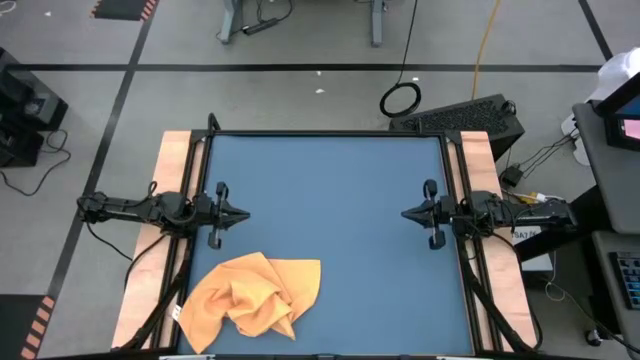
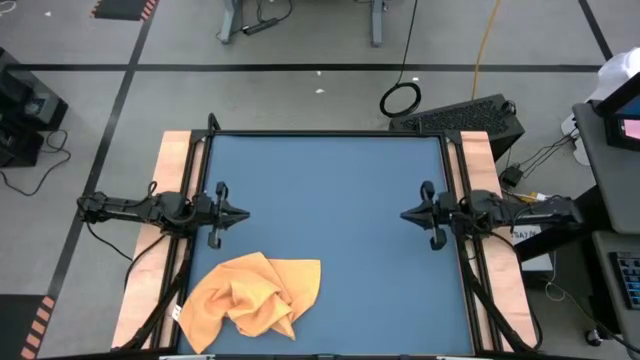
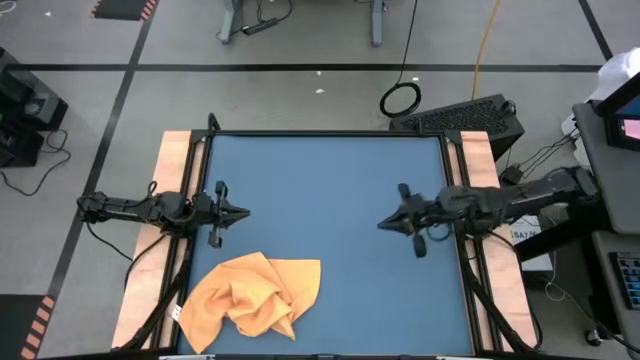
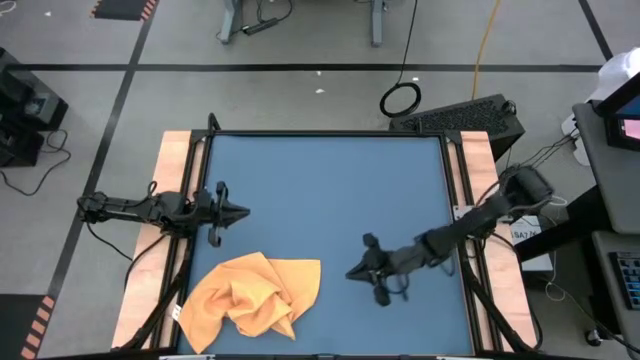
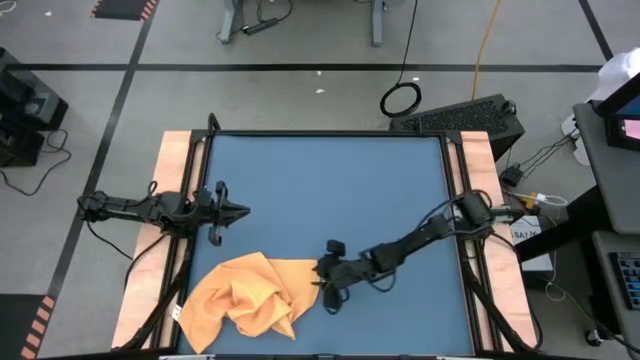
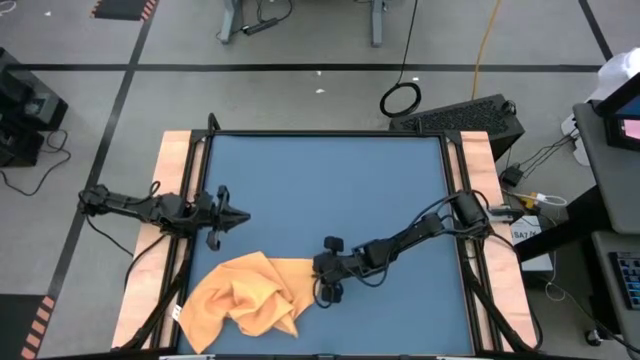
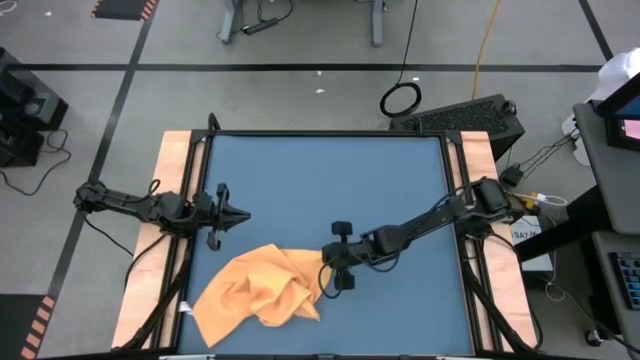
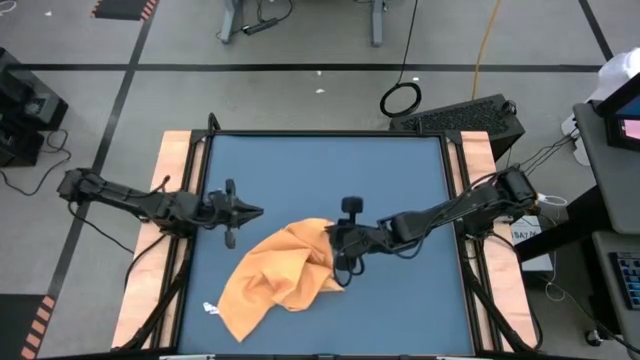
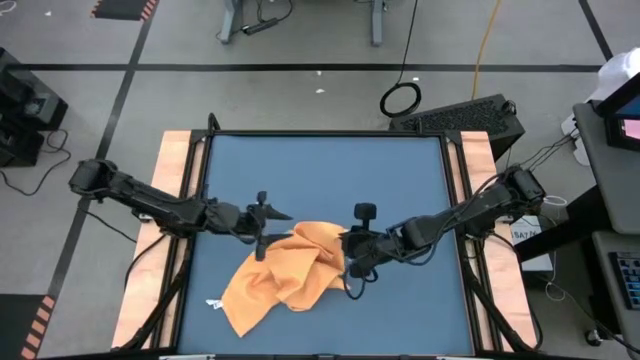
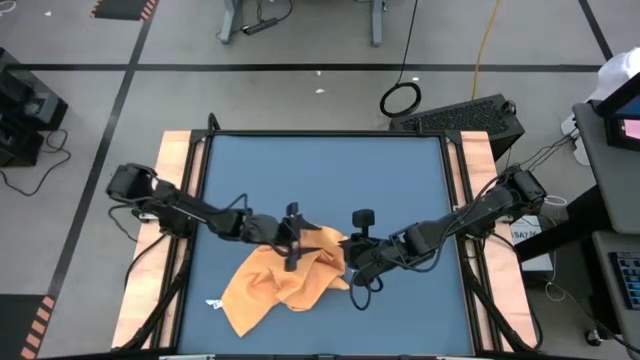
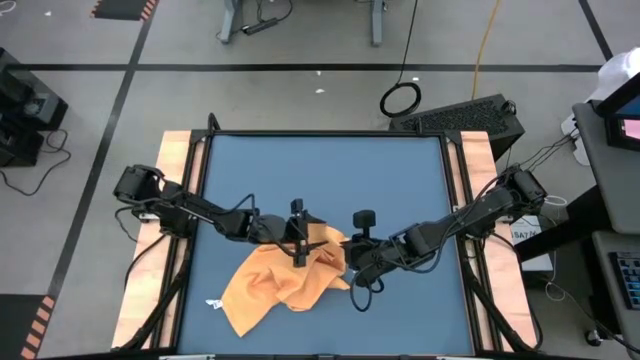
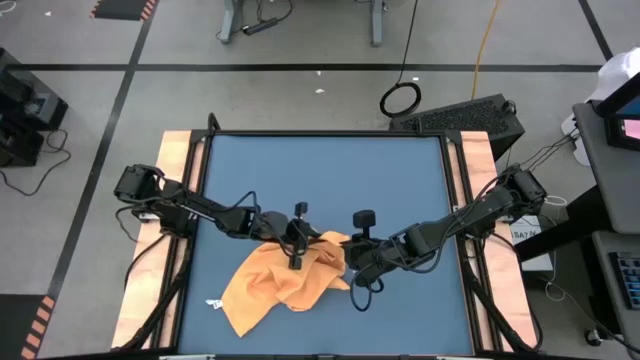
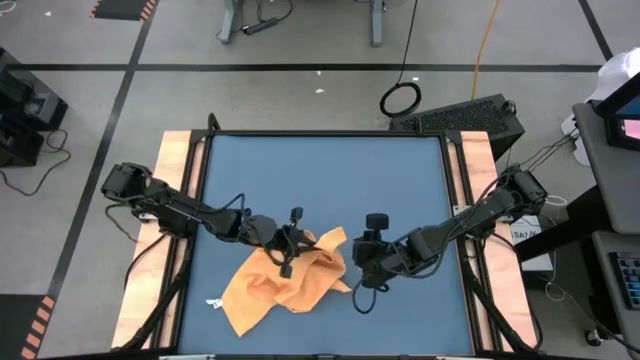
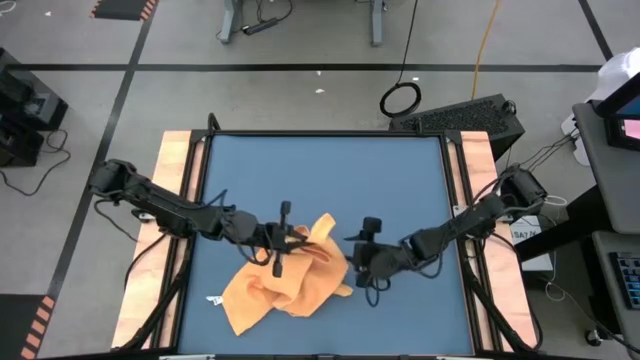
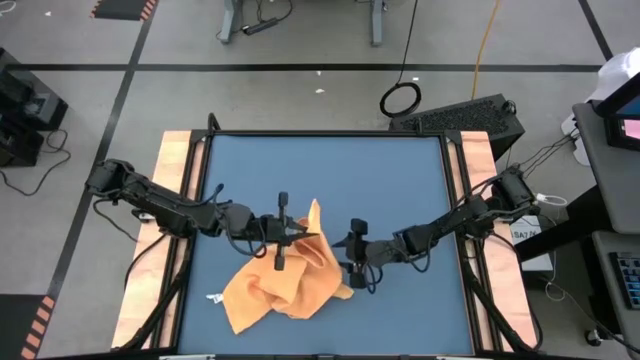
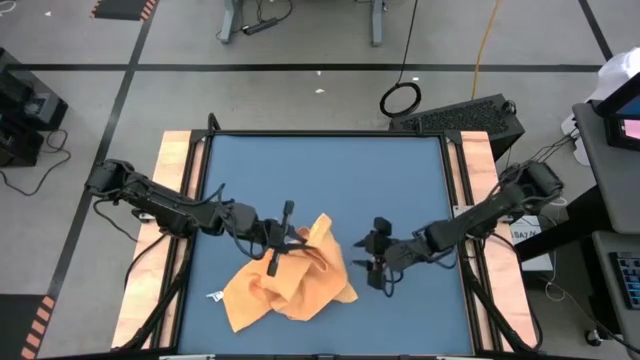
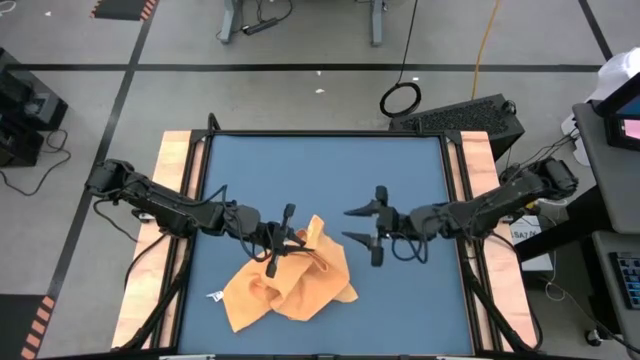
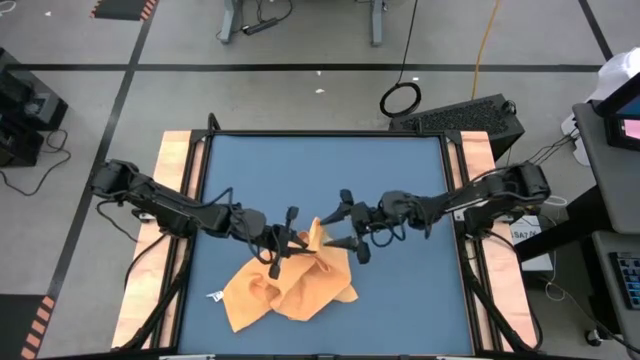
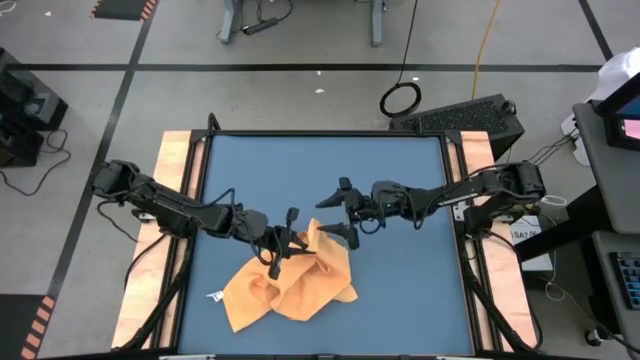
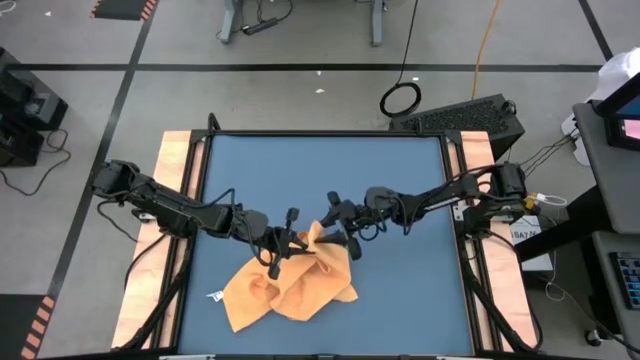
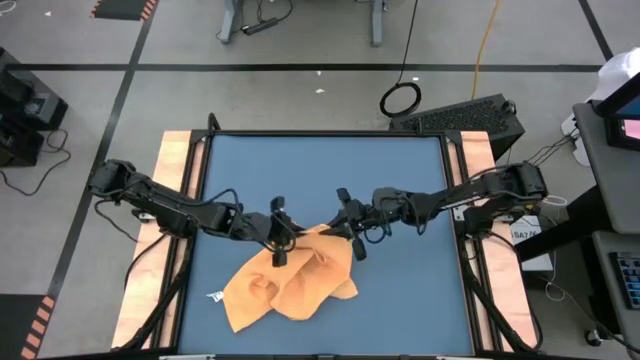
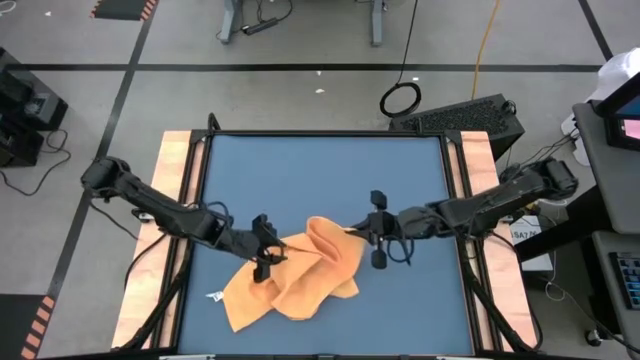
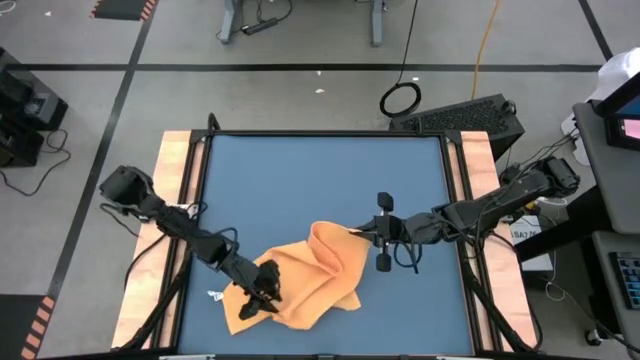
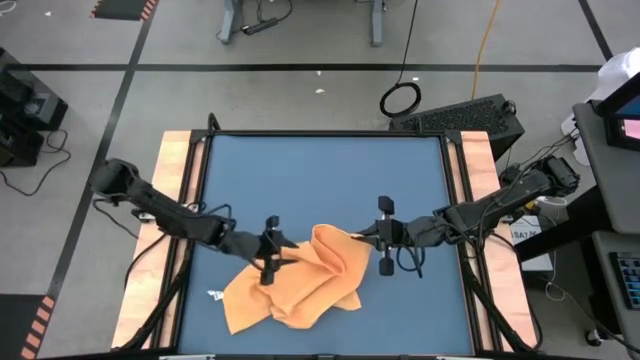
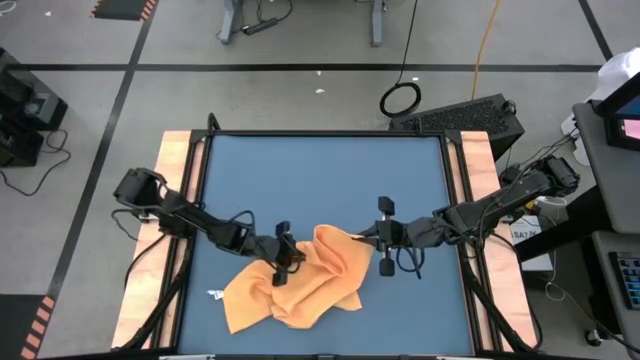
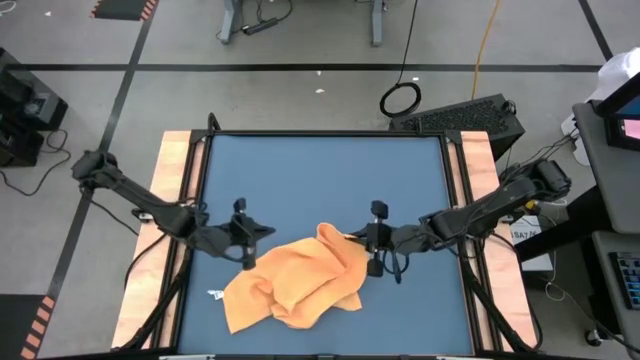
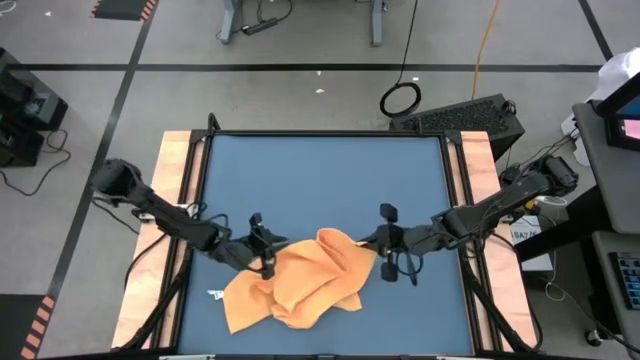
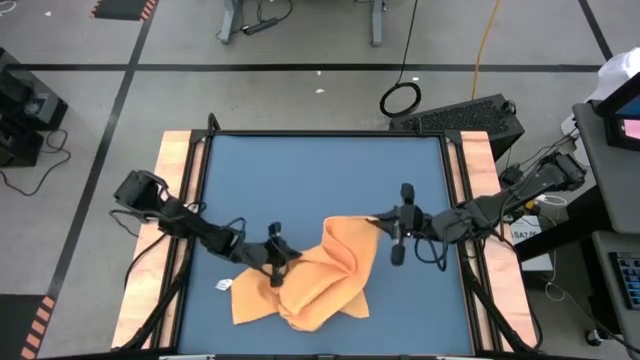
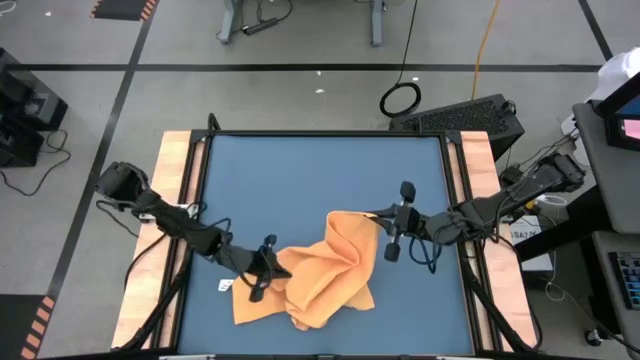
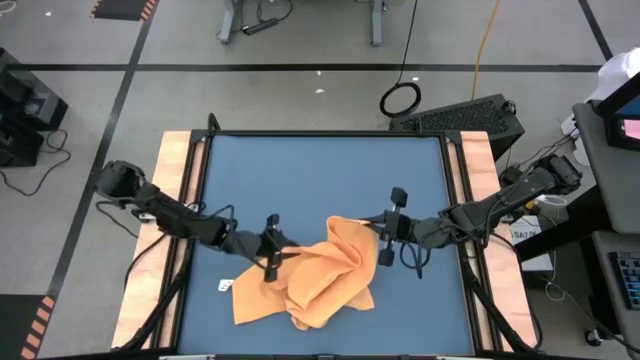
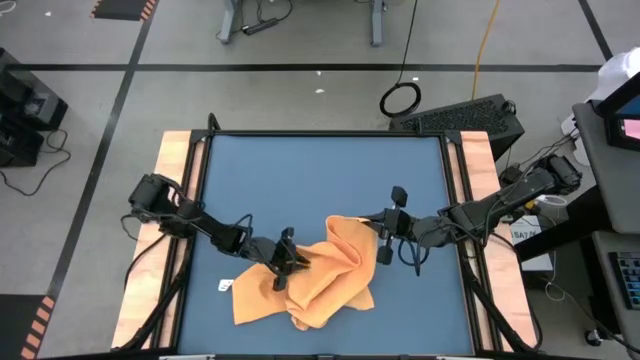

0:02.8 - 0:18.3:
Task: Roll towel
Roll the yellow towel

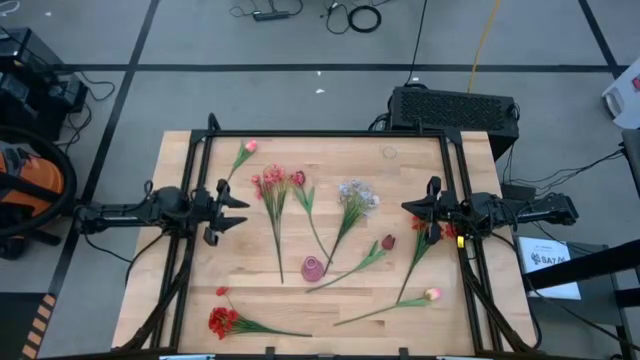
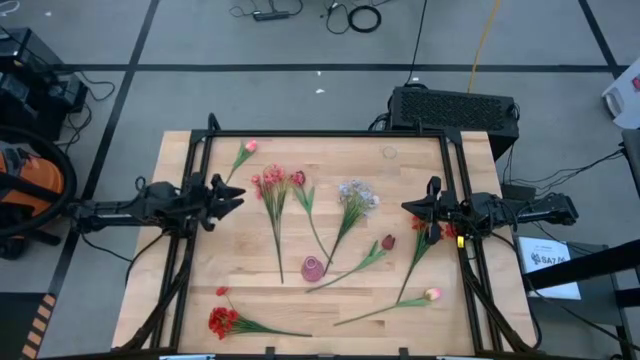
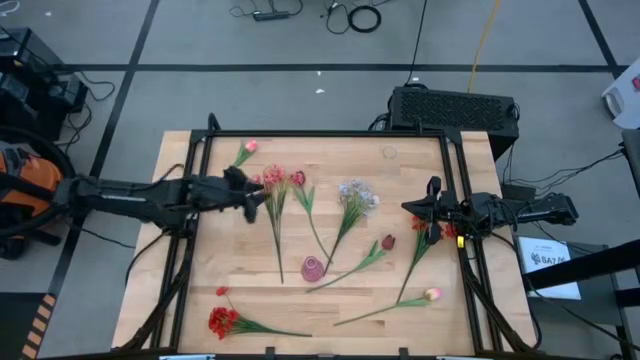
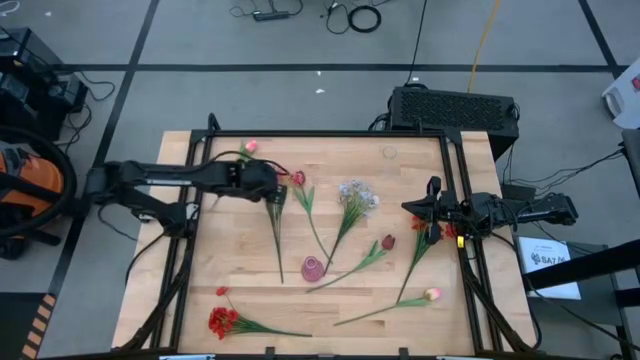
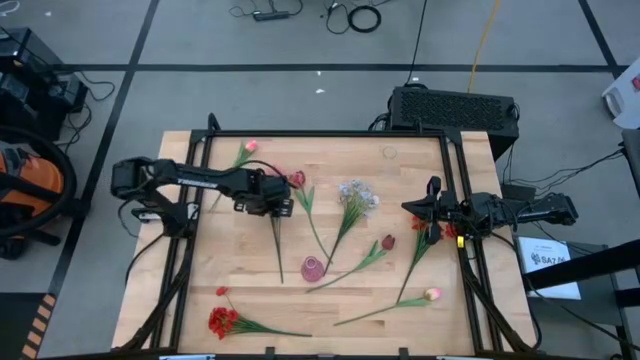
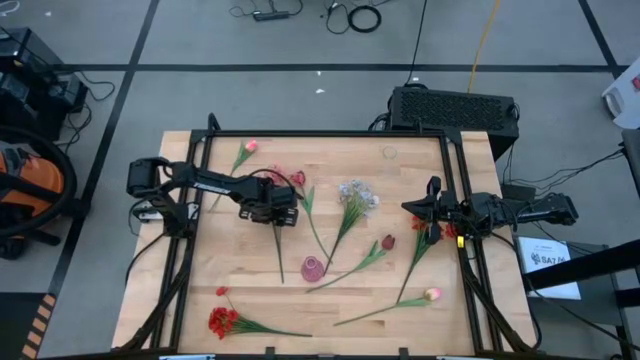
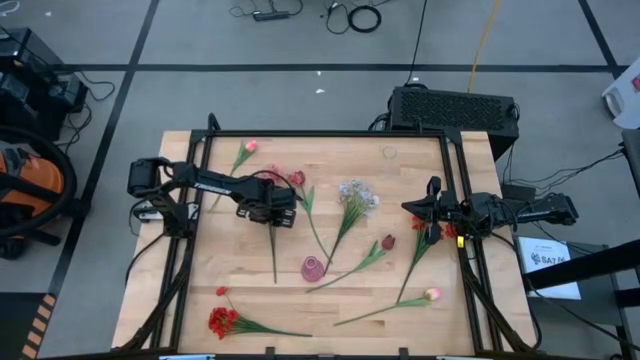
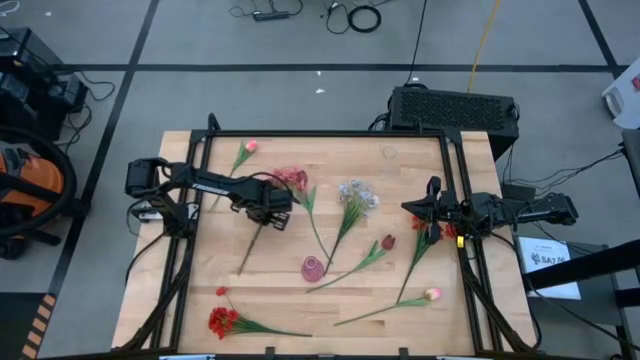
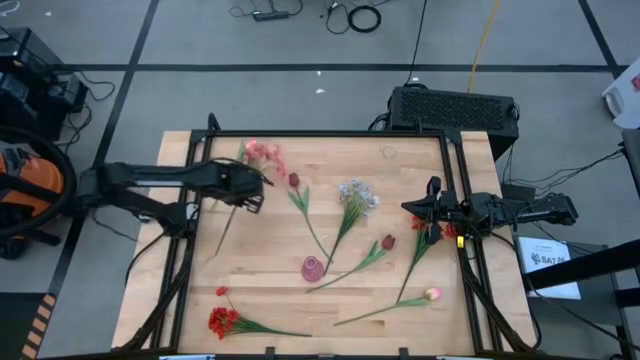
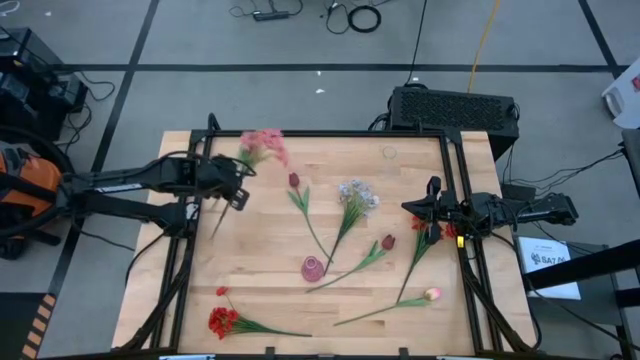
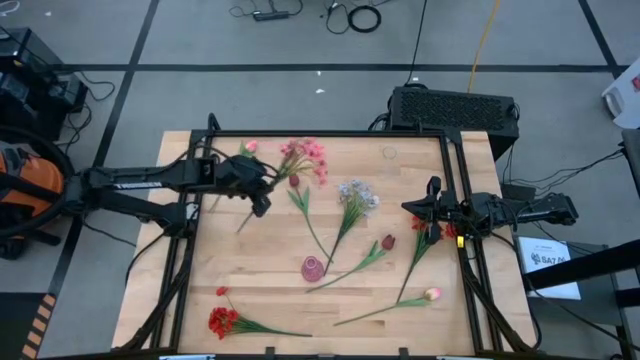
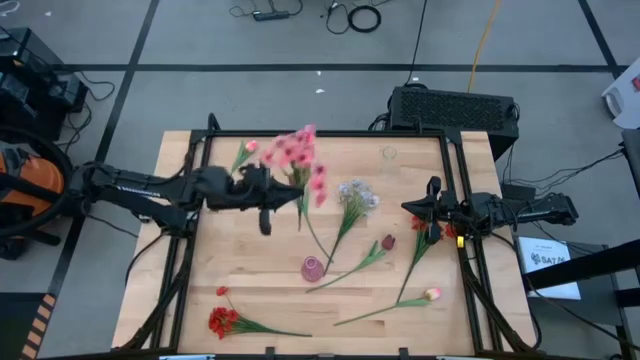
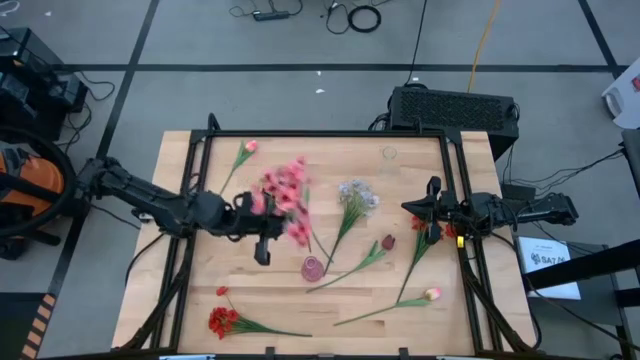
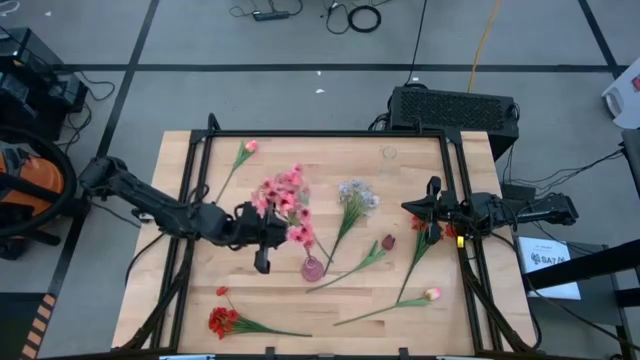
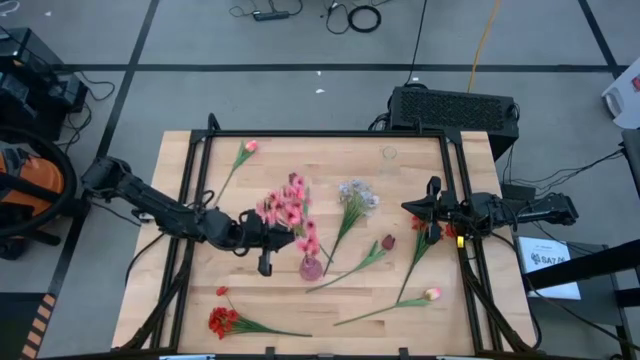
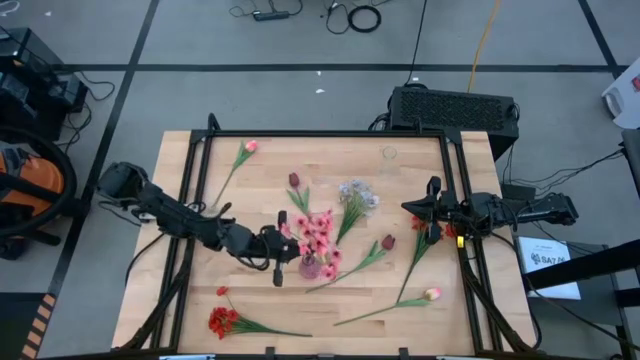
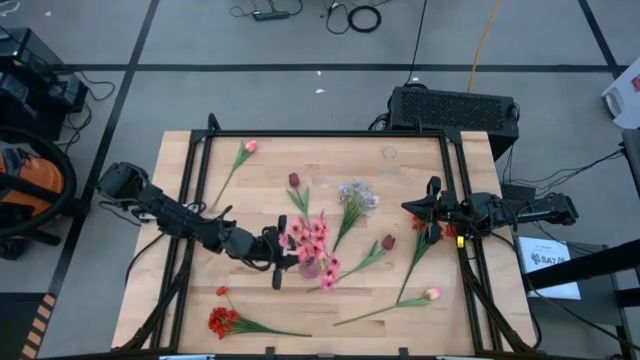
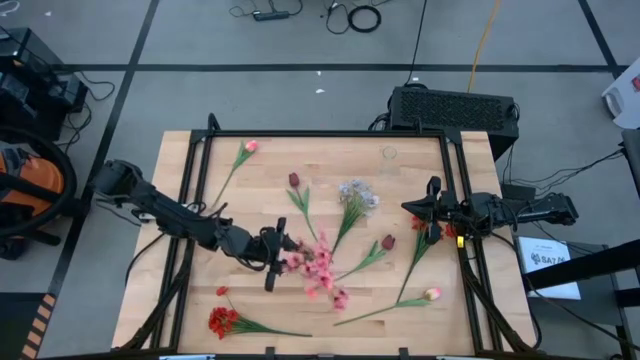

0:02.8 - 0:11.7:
Task: Sort flowers into vase by color
Put the pink flowers into the purple vase
